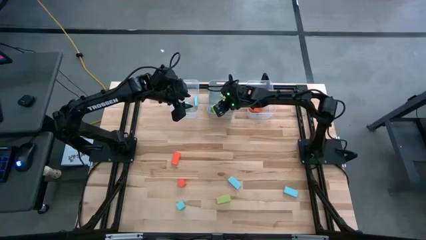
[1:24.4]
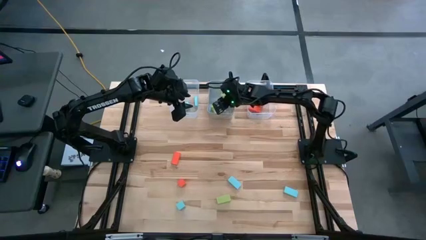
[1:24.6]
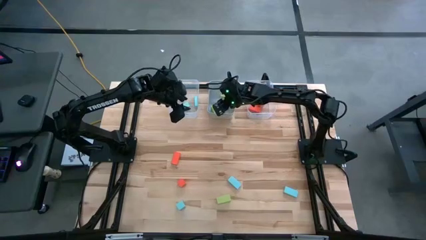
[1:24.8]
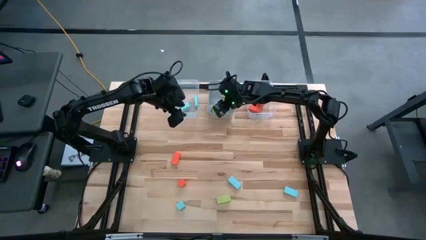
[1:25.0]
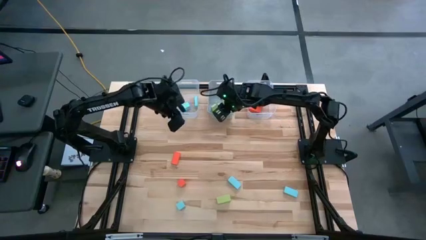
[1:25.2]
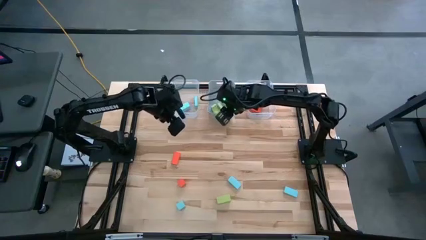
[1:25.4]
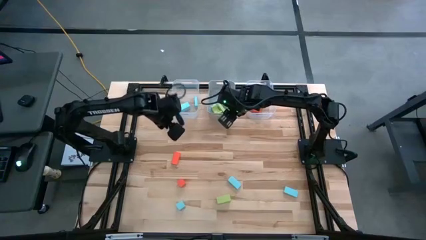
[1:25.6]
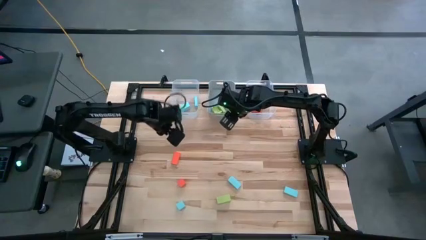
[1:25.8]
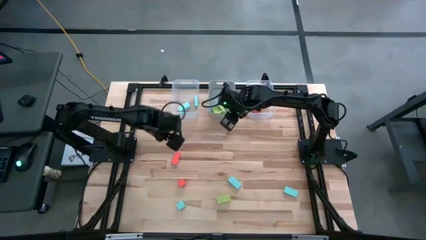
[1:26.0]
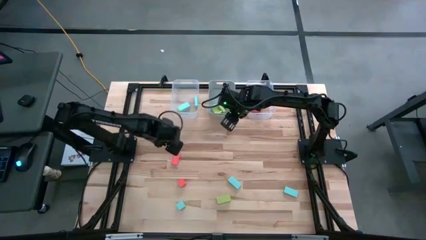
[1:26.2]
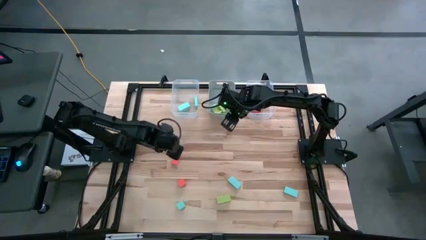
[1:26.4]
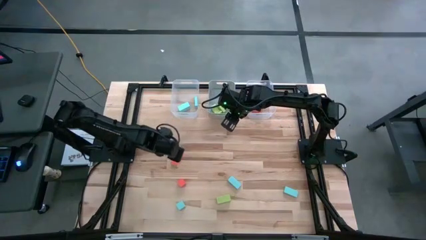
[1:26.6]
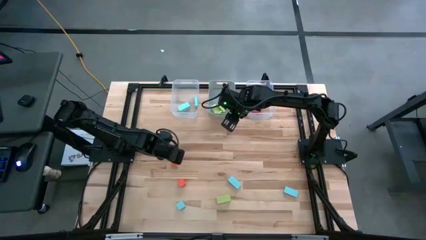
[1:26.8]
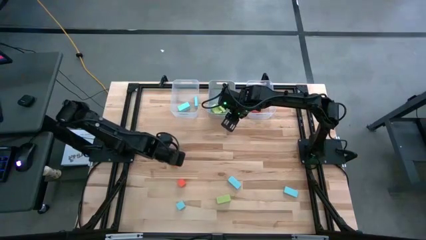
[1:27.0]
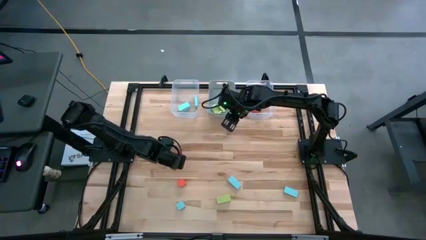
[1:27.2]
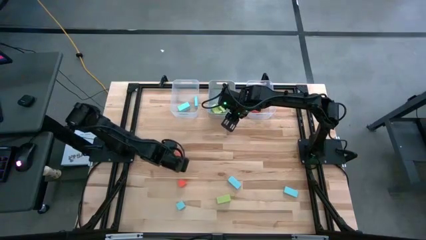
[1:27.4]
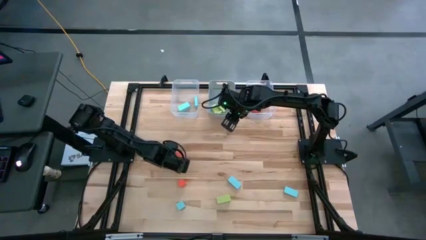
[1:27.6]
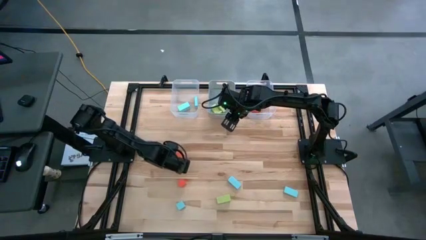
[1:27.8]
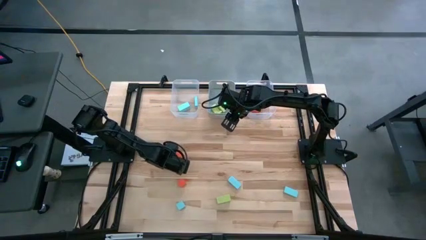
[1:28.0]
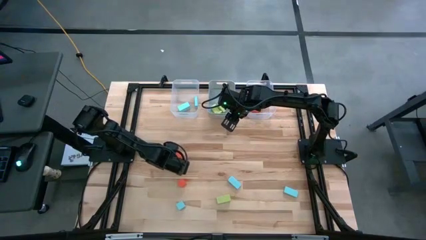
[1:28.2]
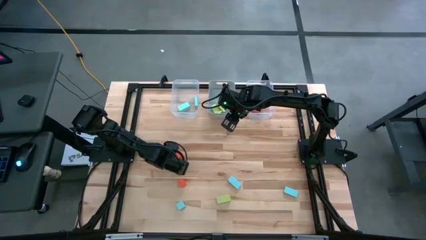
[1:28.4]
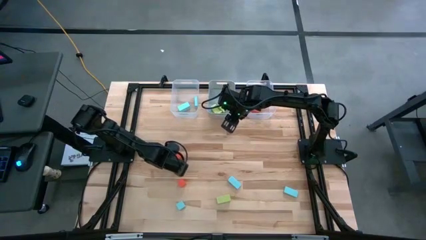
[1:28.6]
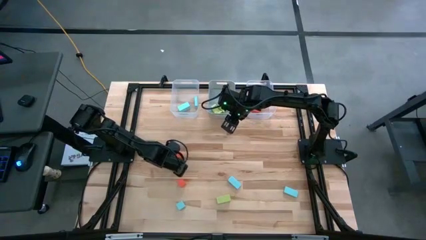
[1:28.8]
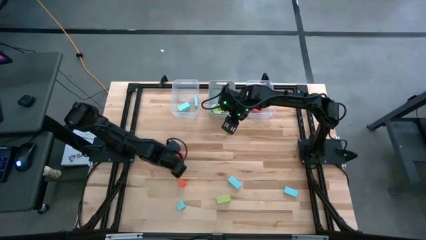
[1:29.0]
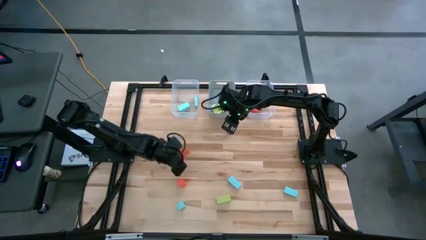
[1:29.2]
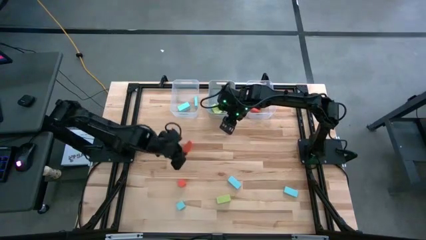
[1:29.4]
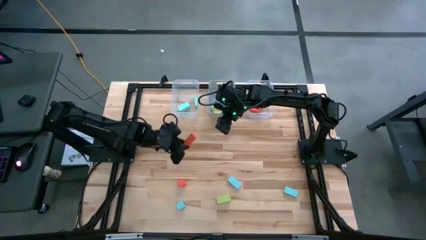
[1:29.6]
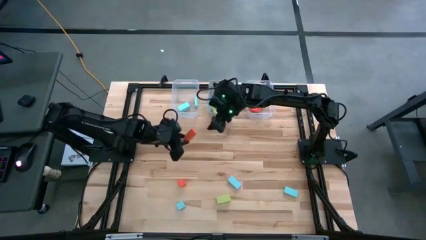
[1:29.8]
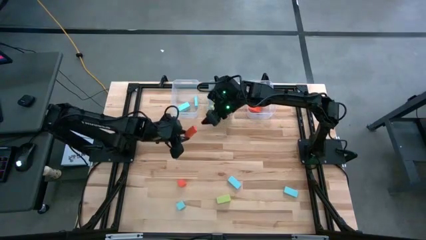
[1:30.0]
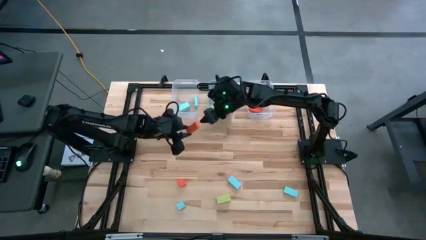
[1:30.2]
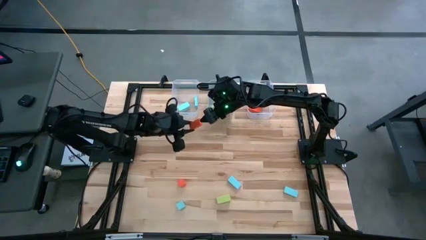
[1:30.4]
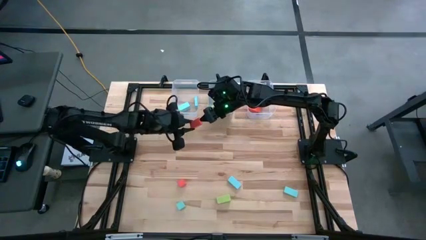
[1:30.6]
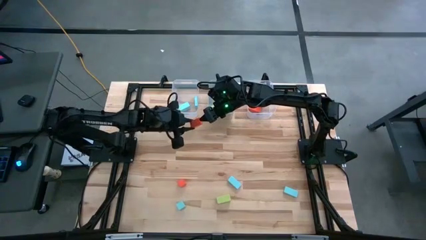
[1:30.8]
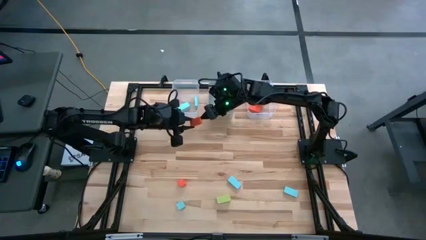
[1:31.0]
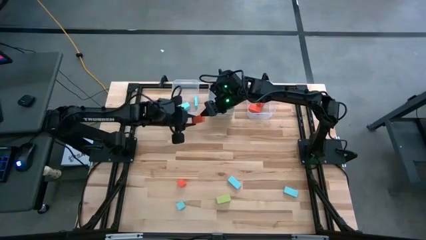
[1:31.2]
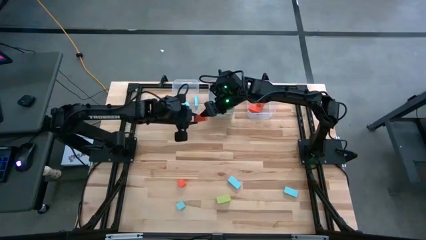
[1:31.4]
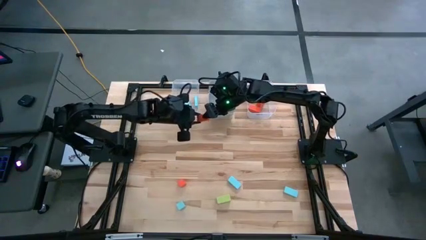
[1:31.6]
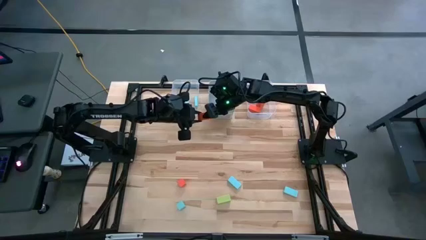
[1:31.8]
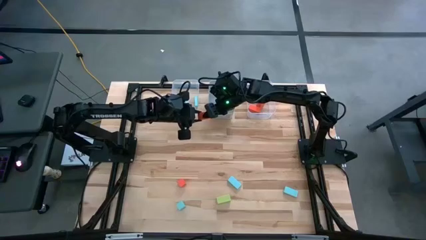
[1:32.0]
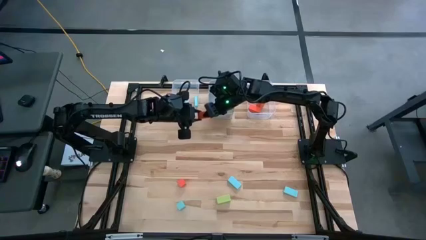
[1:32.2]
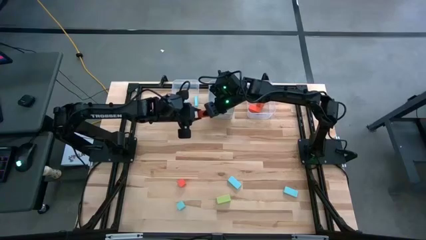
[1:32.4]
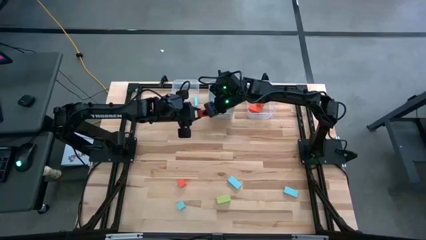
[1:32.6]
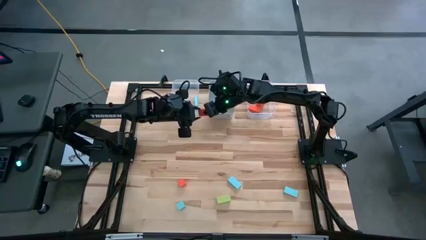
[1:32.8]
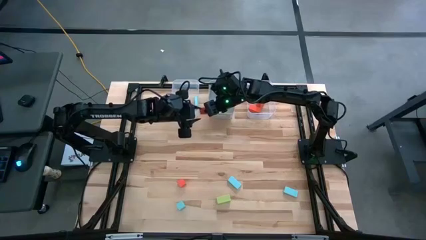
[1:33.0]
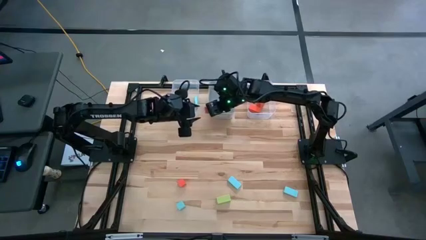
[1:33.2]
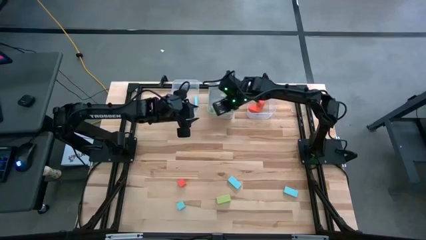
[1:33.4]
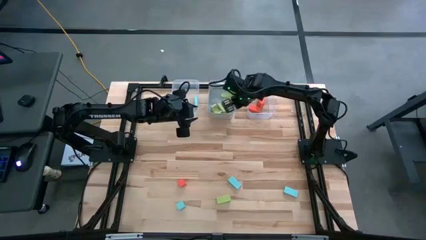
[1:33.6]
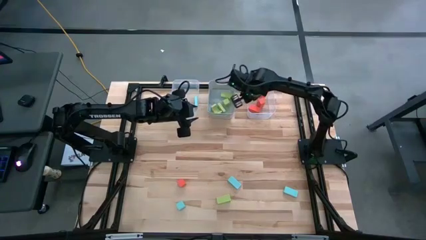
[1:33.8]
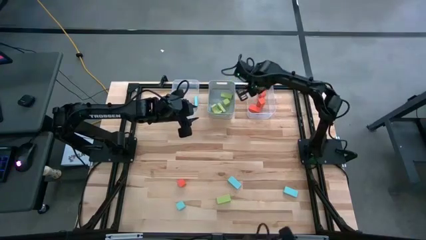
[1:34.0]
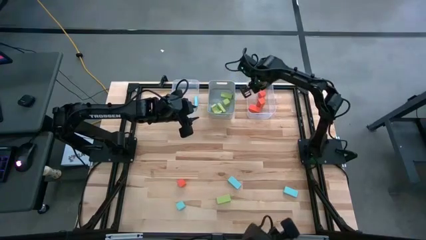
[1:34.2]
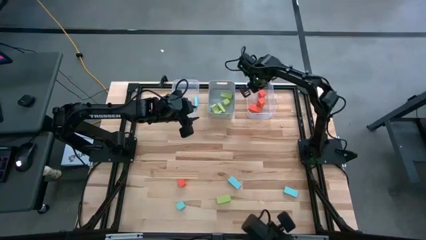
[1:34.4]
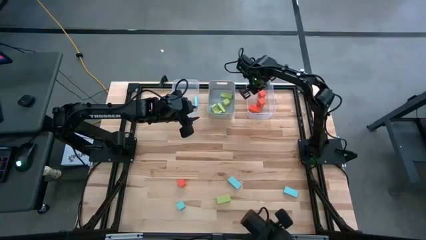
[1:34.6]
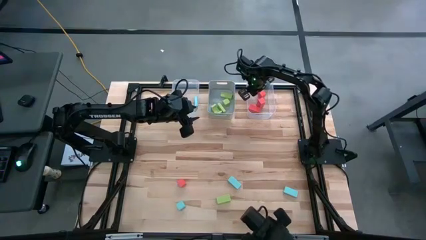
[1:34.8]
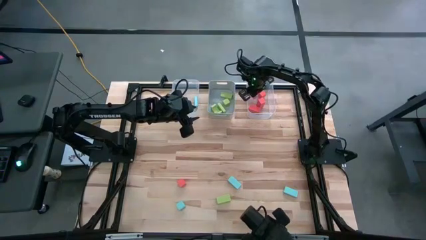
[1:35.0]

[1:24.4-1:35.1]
Task: Sort & place blocks by color
Put the orange block into the right transparent bin
